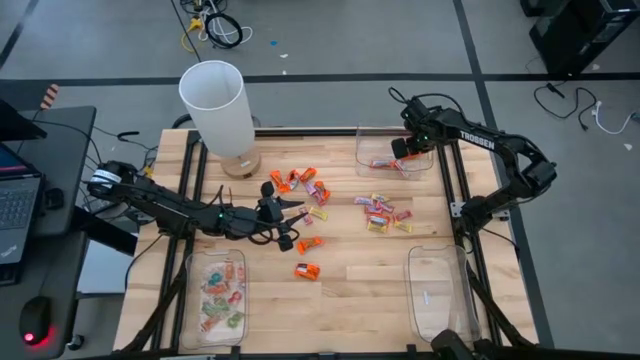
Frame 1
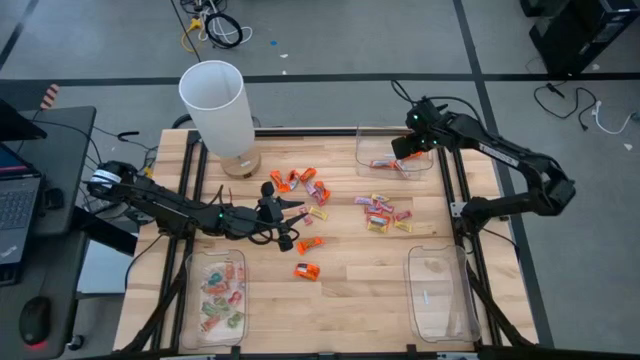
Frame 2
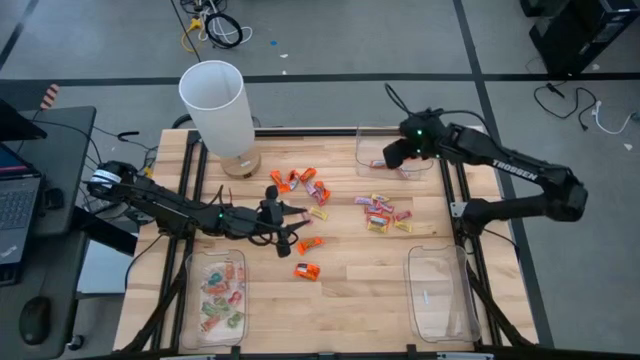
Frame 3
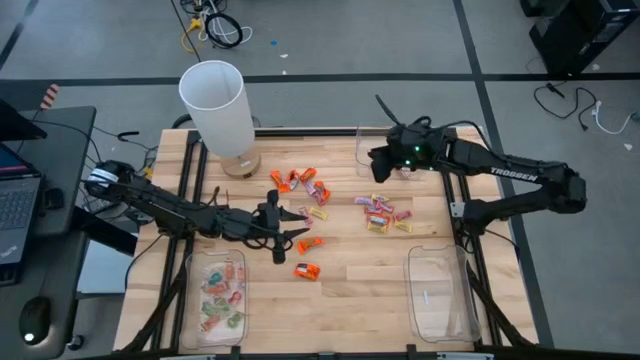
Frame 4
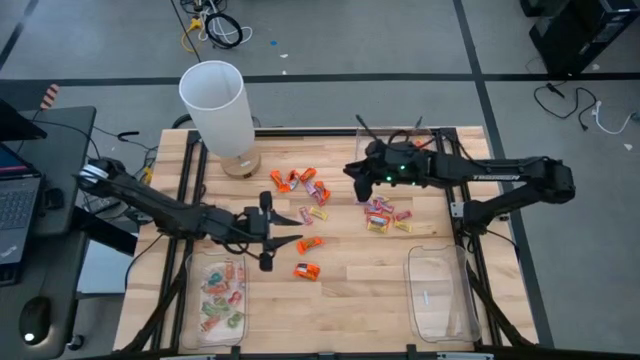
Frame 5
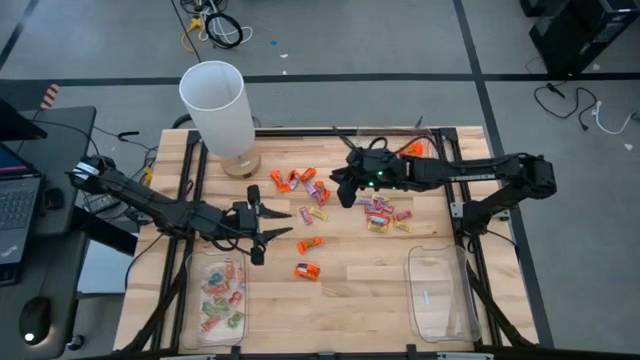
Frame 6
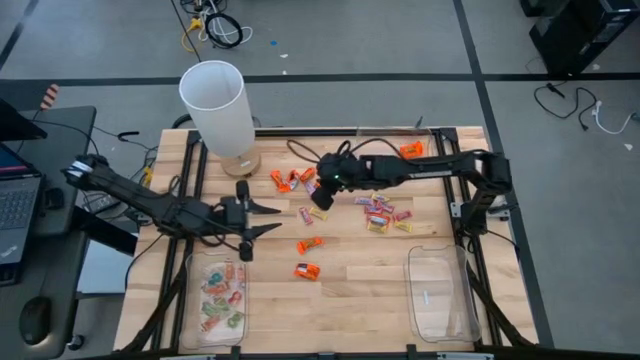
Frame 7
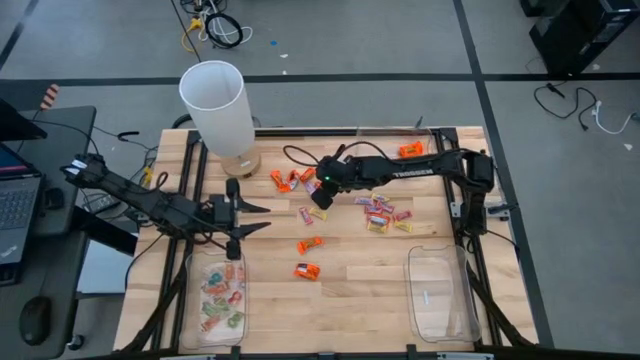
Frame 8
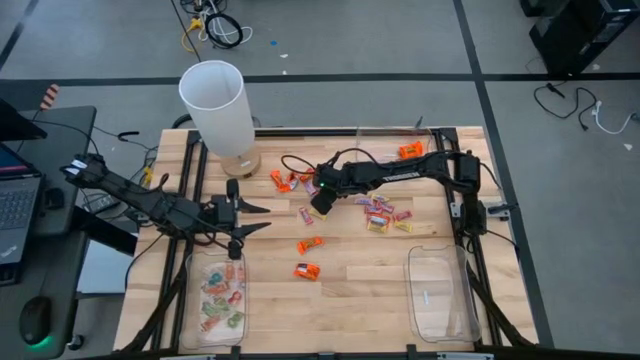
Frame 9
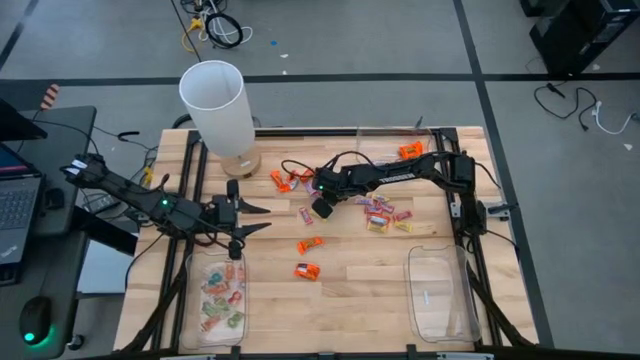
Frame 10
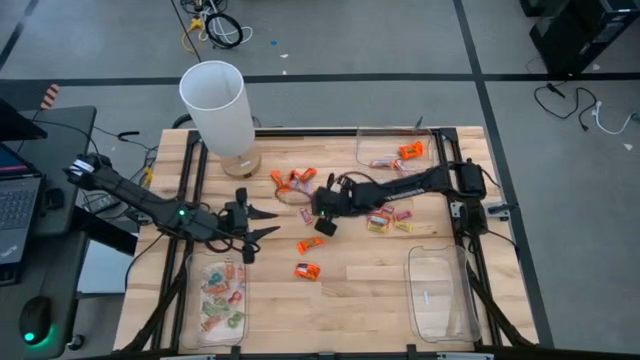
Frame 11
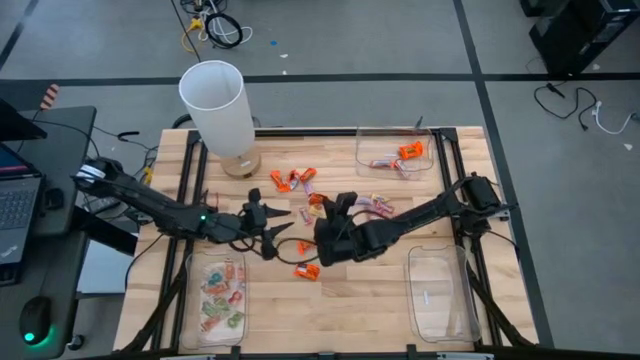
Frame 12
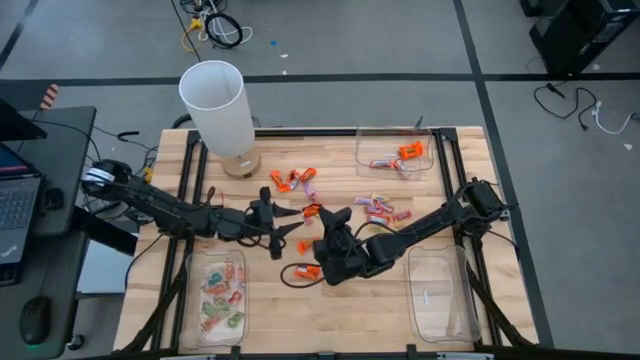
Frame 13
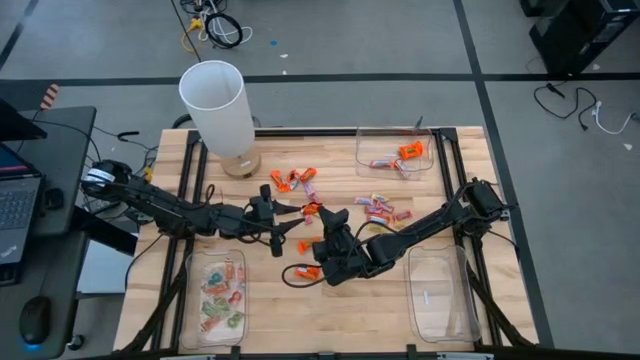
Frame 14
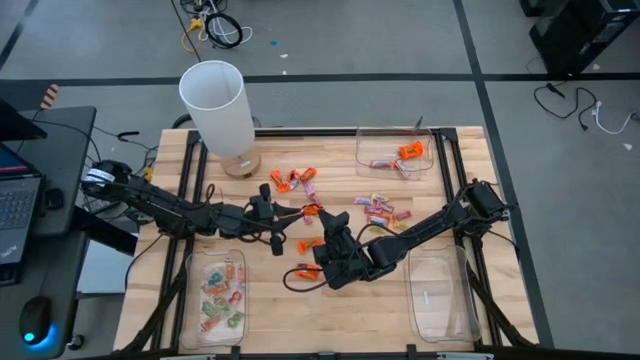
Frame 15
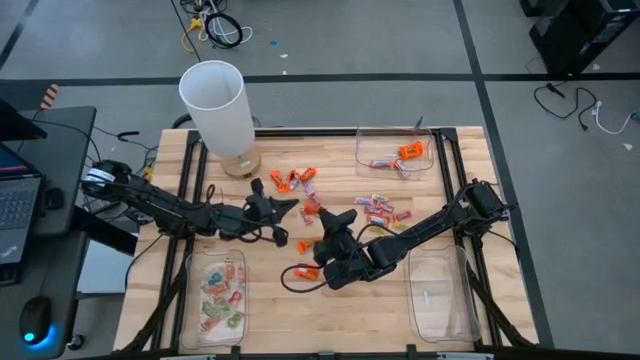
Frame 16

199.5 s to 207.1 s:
Task: Sort candy
Put the large orange chocolate bar into the top right transparent bin

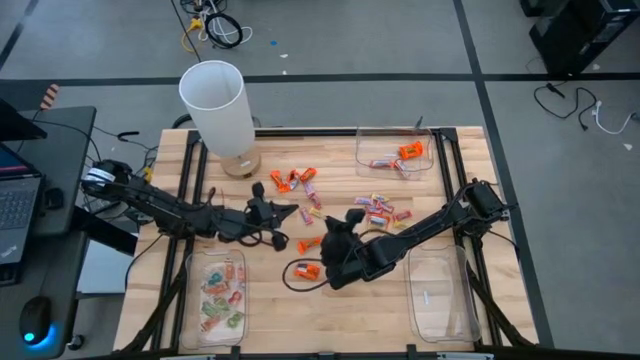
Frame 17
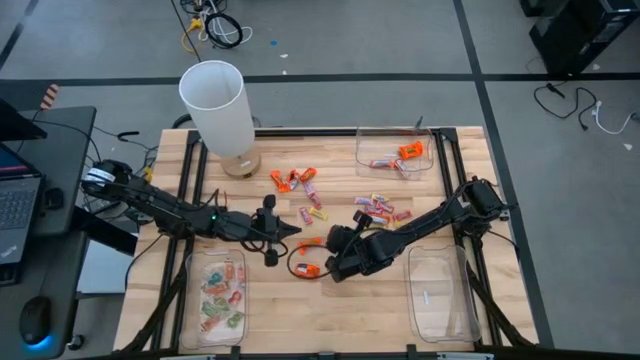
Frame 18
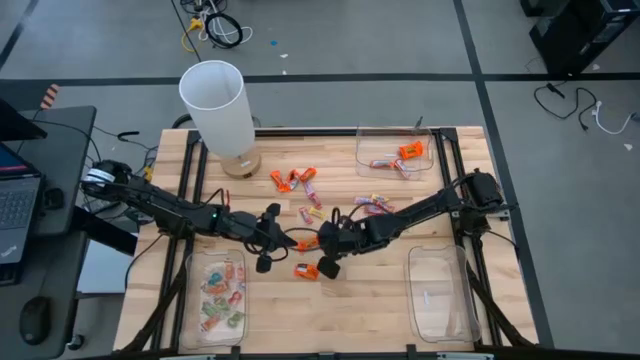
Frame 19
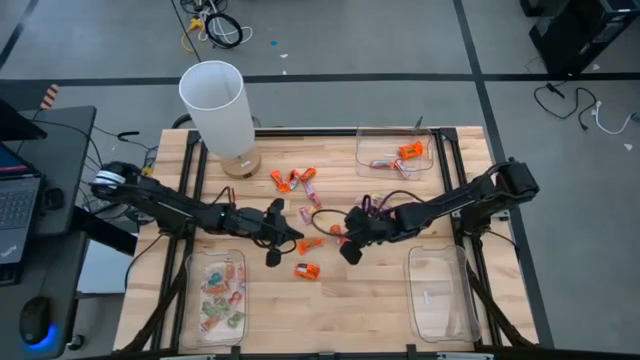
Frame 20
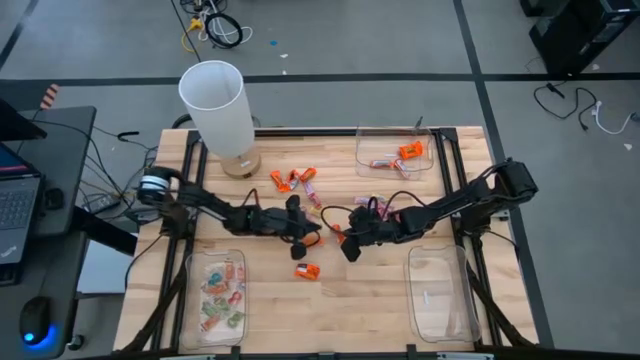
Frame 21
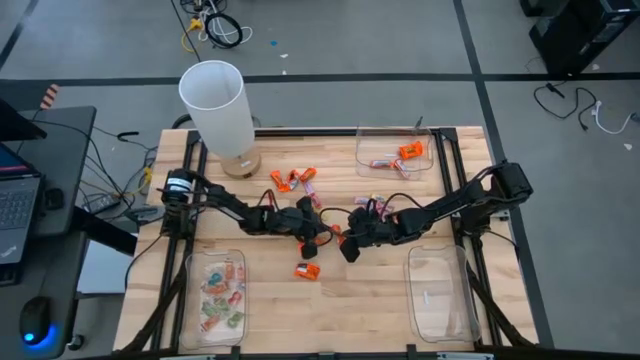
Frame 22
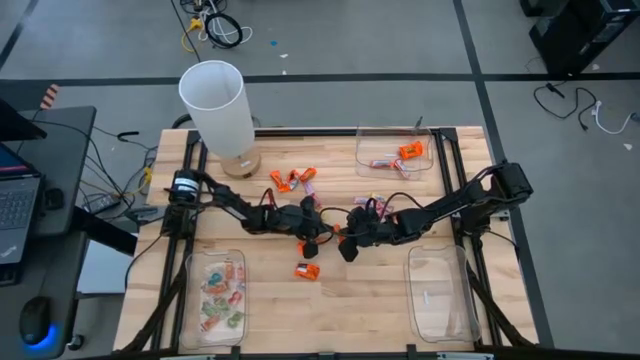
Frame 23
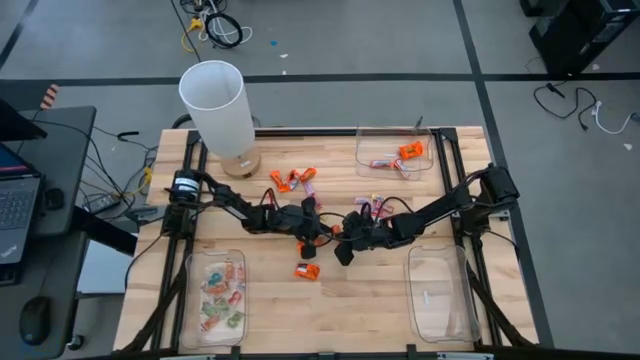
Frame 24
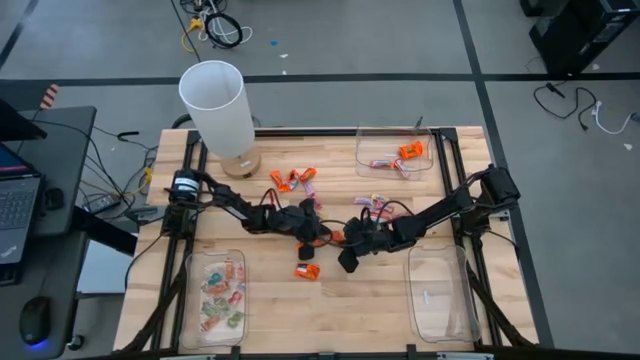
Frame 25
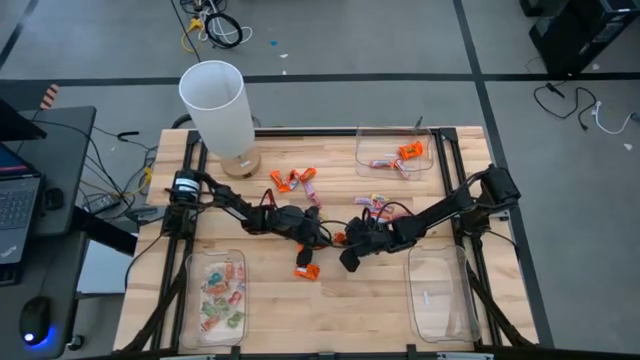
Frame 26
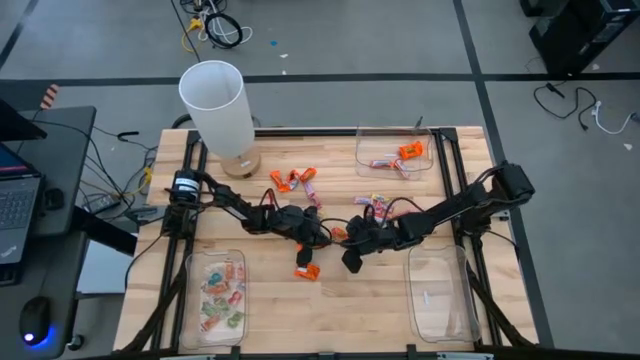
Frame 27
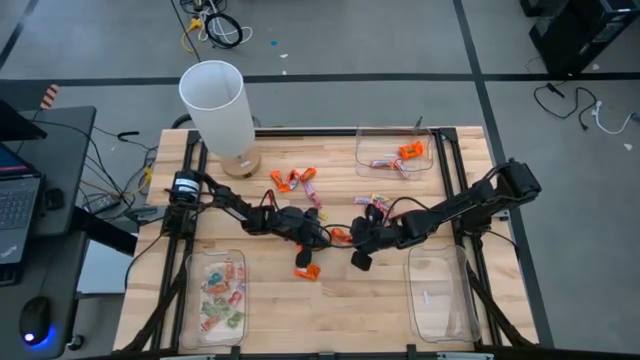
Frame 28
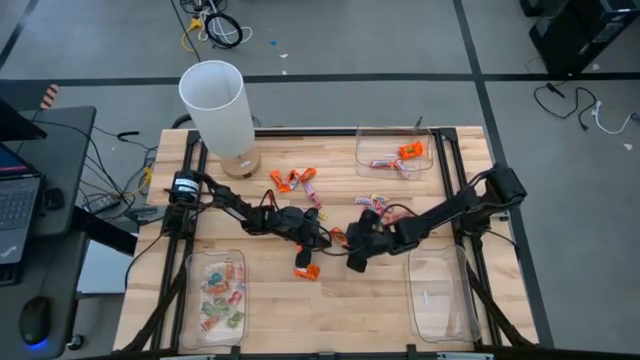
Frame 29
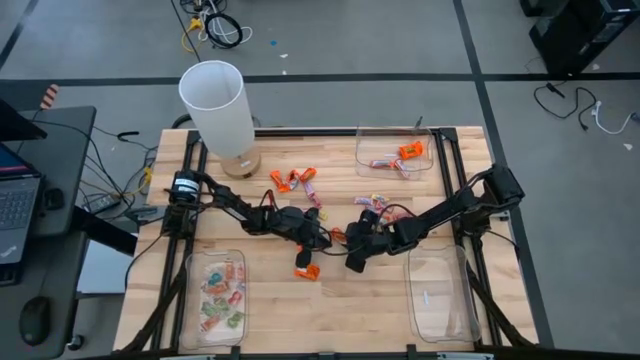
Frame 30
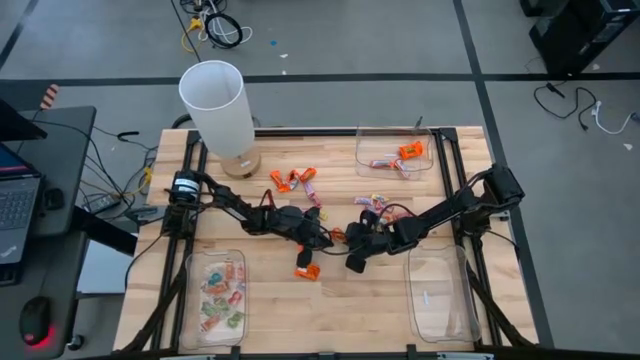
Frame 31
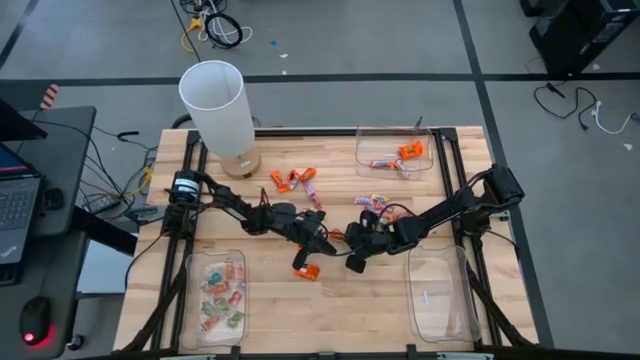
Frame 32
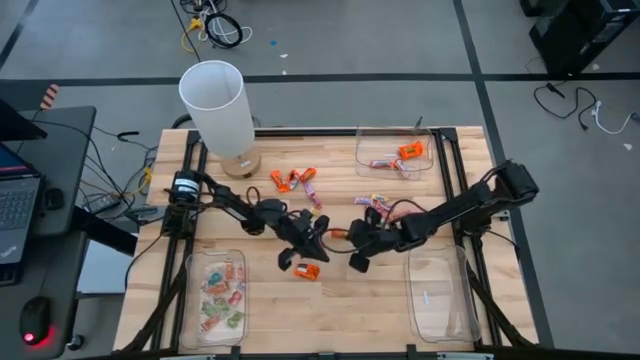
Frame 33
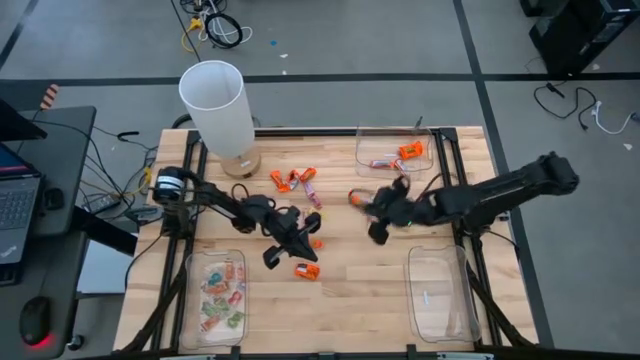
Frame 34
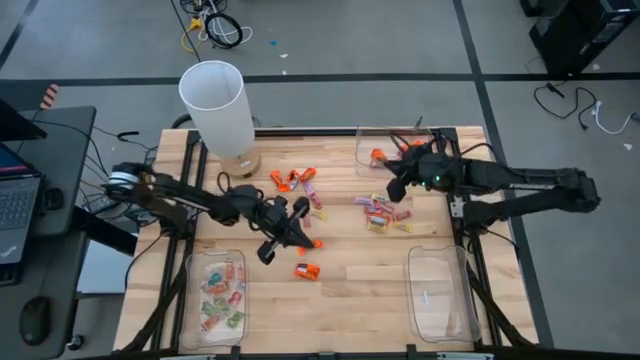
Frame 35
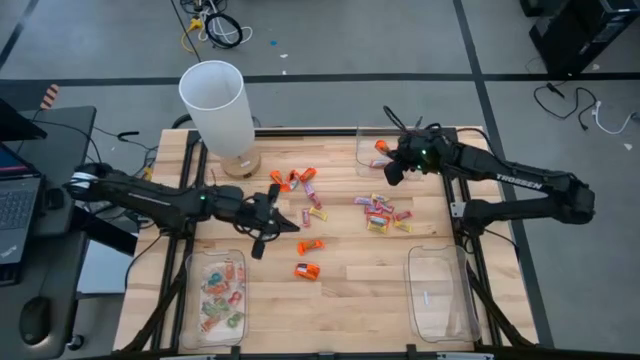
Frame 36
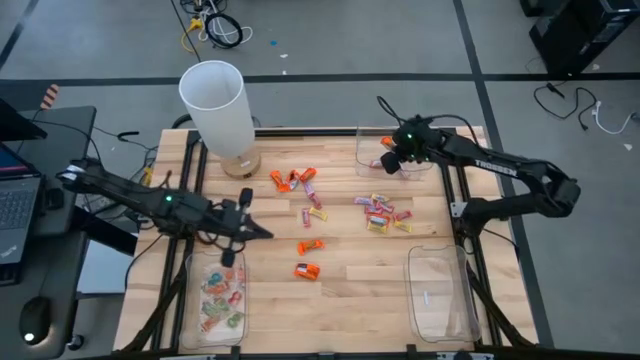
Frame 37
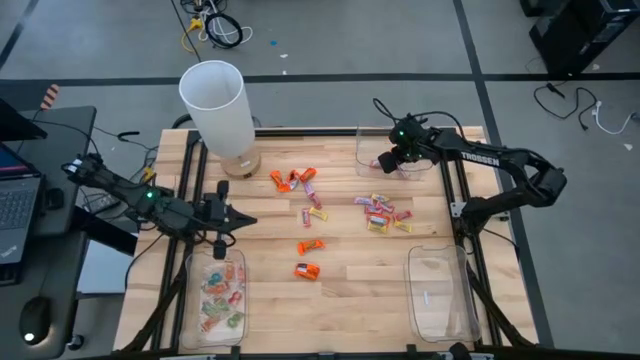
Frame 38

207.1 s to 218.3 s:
Put the large orange chocolate bar into the top right transparent bin

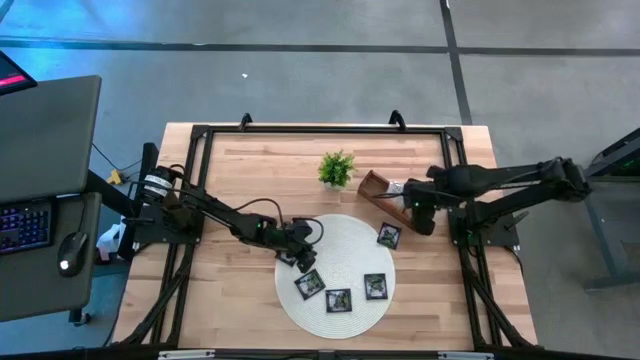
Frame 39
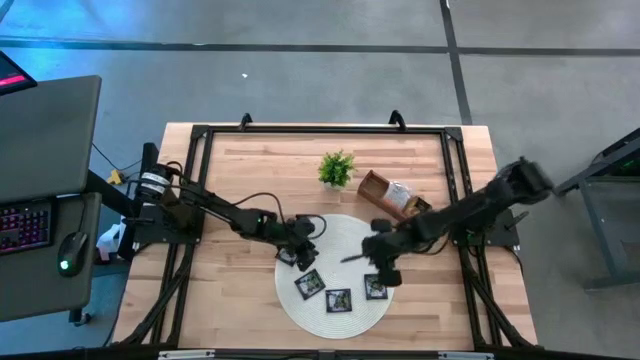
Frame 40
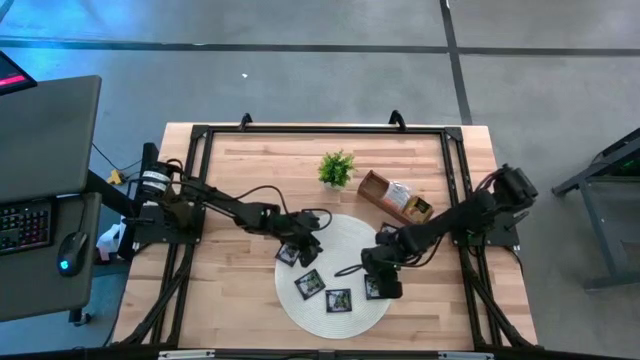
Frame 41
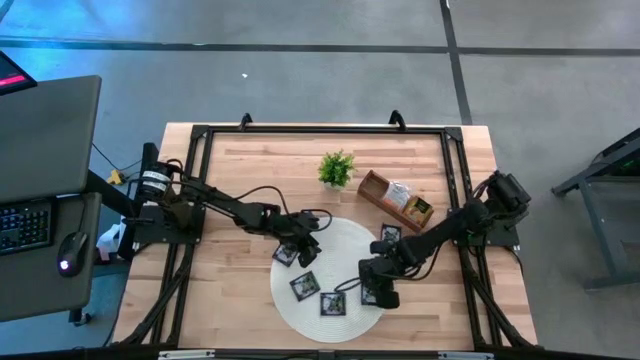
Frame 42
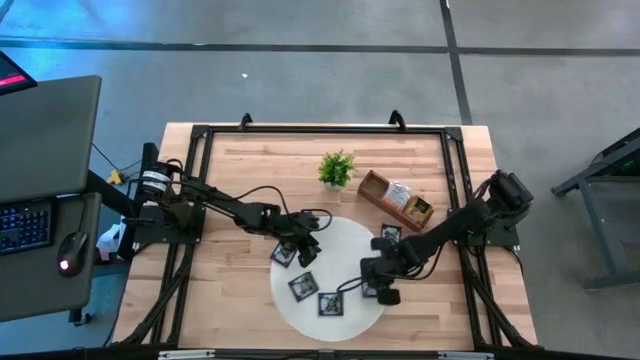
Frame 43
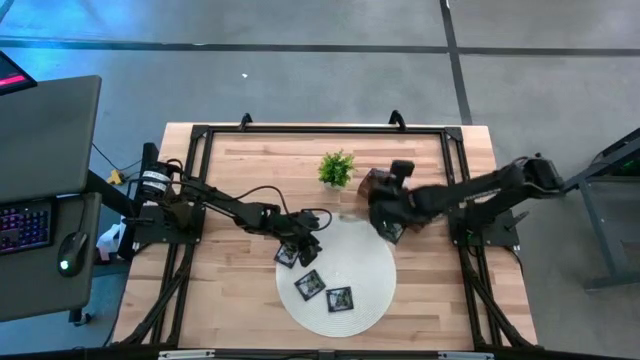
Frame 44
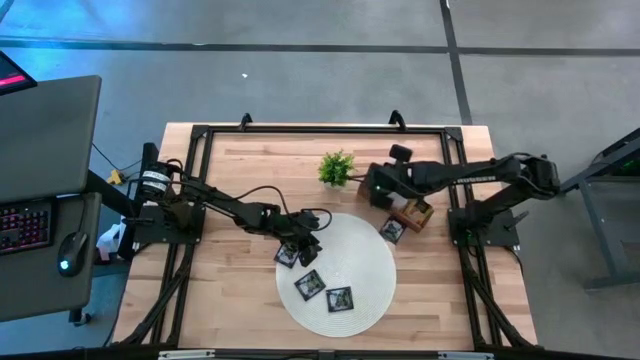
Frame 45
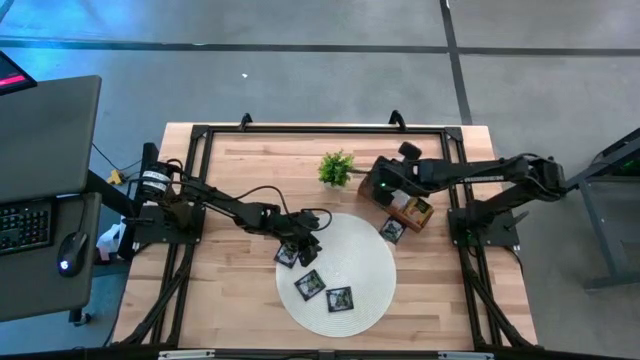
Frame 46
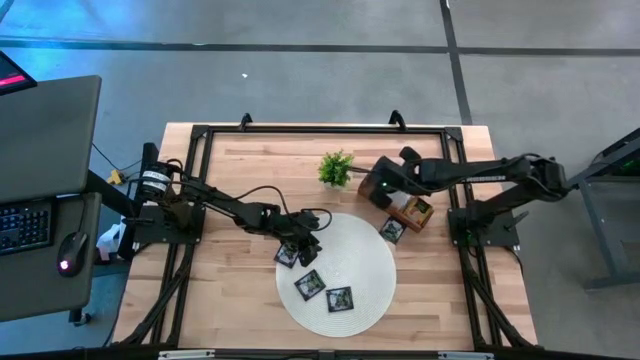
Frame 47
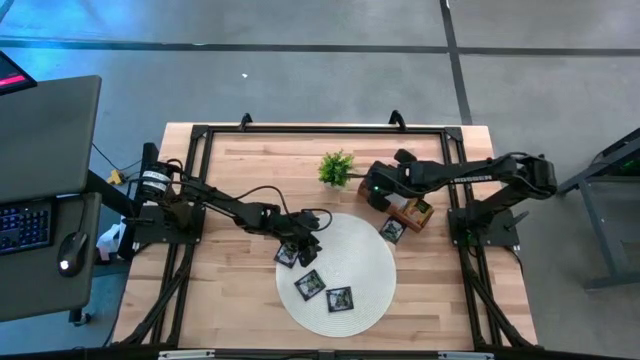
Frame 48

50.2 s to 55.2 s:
Task: Pick & Place Tea
Put the black tea bag into the left section of the wooden organizer
